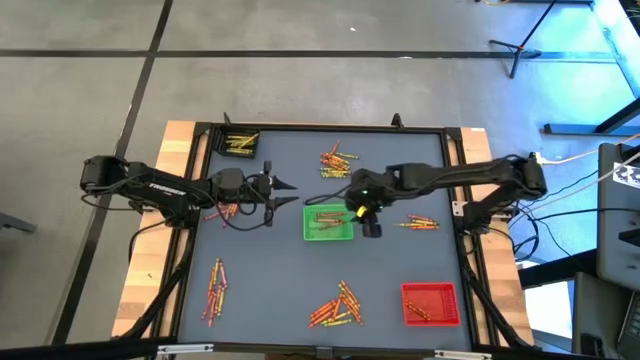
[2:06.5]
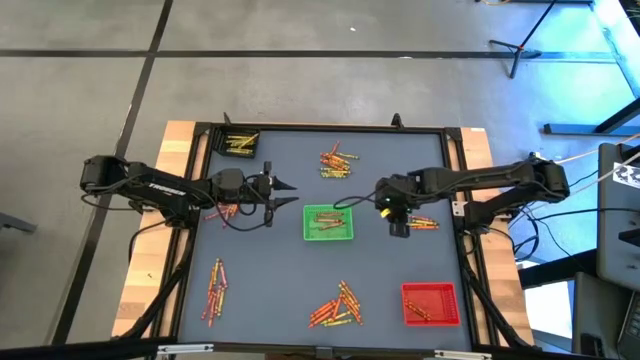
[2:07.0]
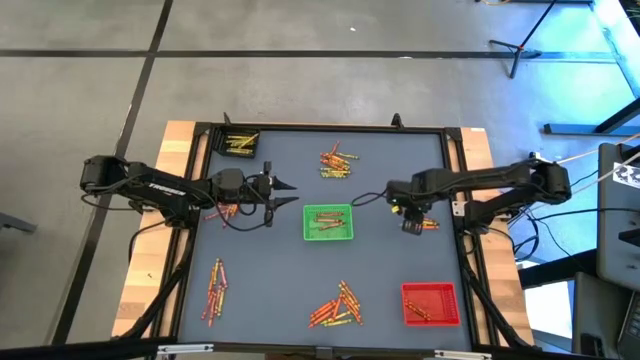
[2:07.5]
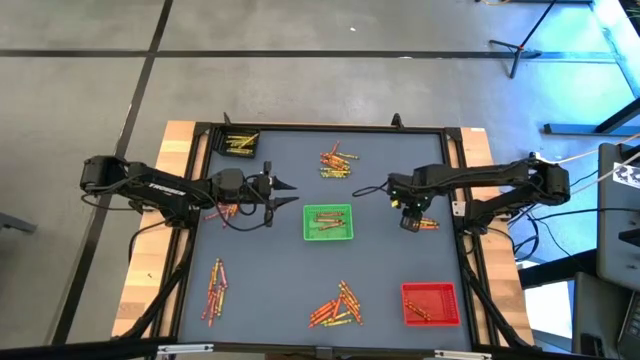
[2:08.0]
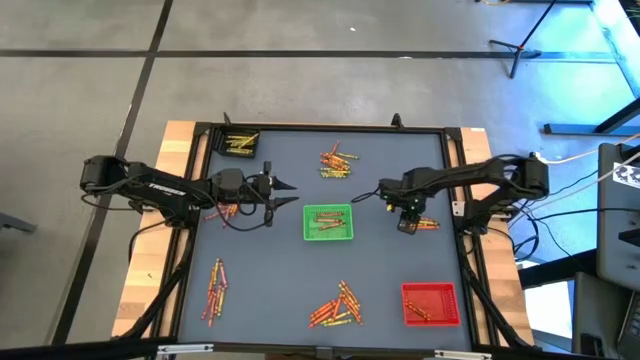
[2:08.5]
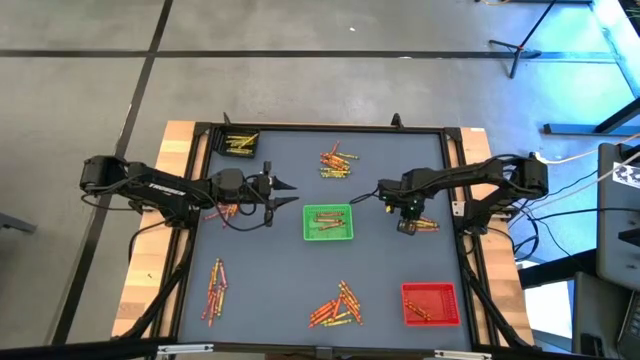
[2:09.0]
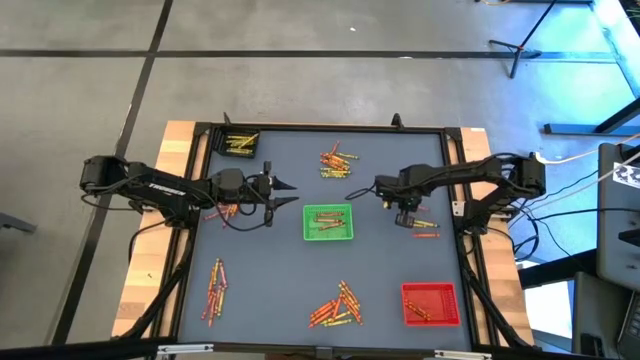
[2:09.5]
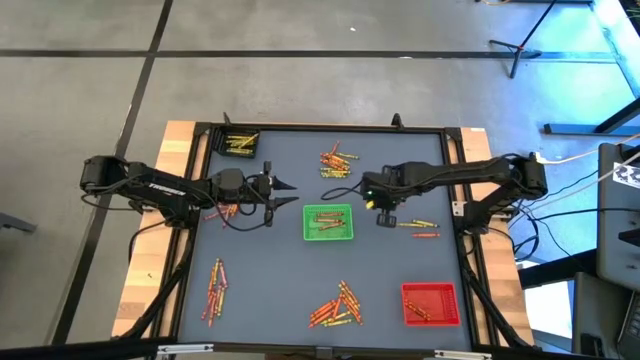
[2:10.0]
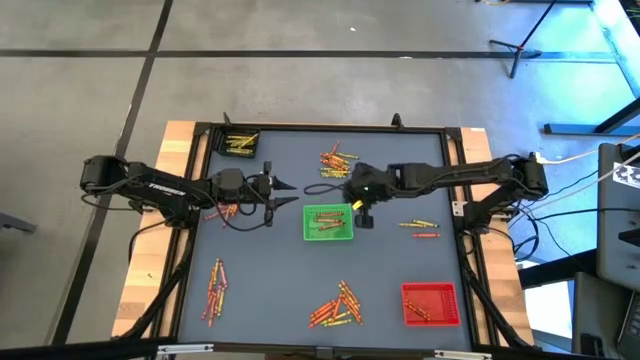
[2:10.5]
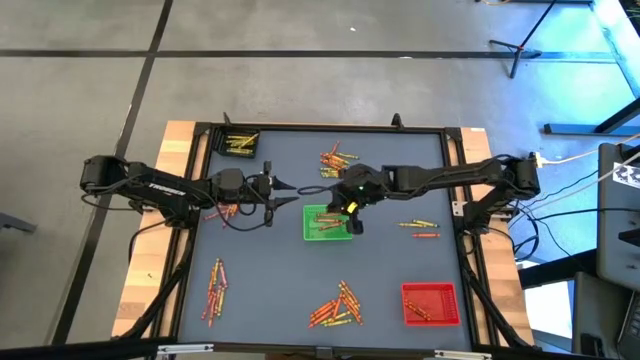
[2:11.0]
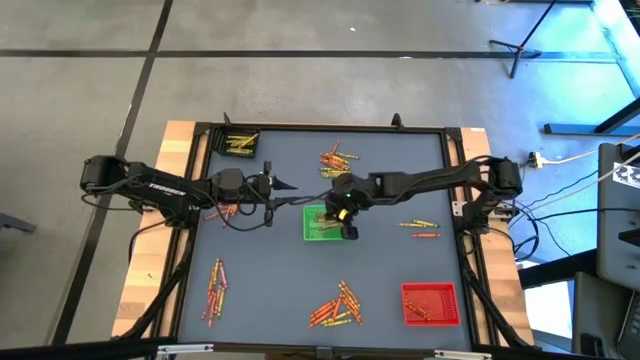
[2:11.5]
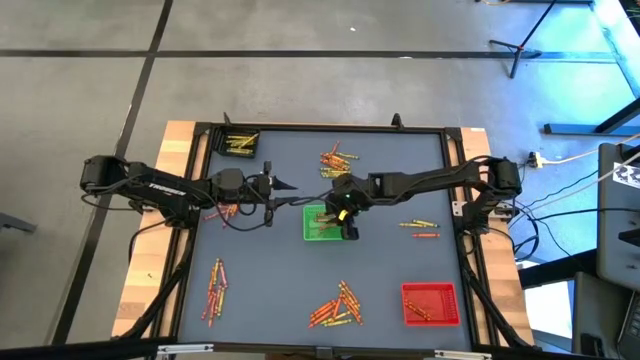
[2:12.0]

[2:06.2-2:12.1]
Task: Sort crayons
Put the red crayon into the green bin

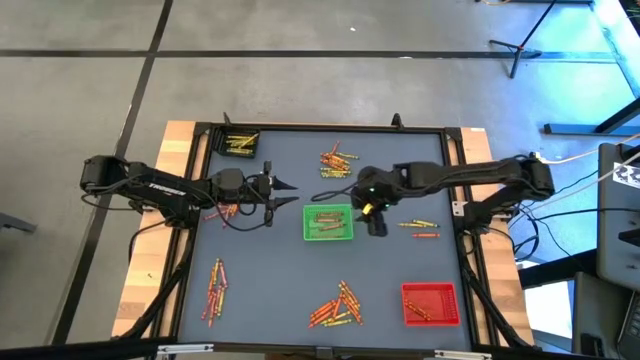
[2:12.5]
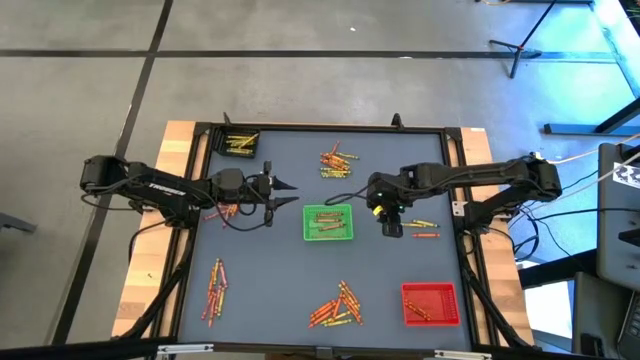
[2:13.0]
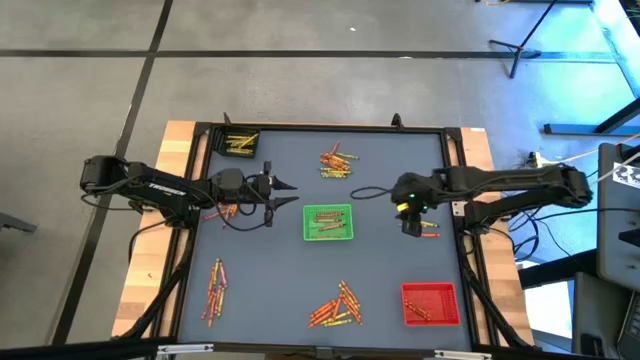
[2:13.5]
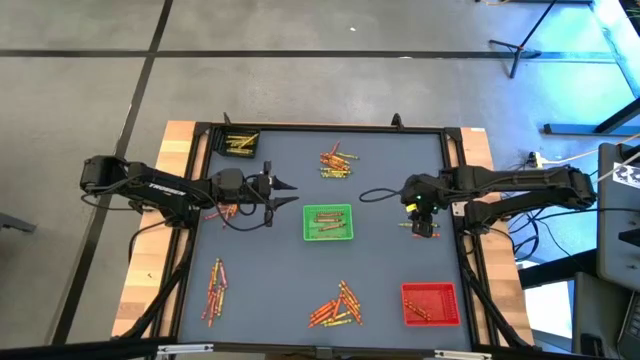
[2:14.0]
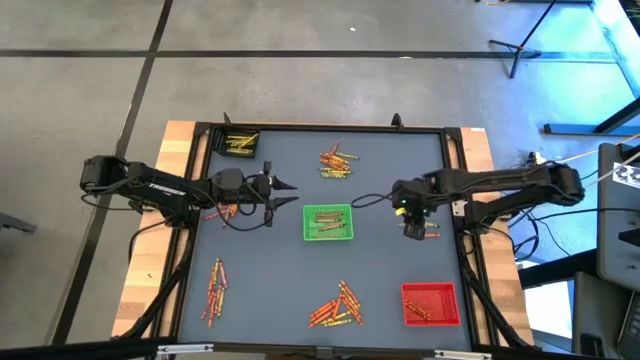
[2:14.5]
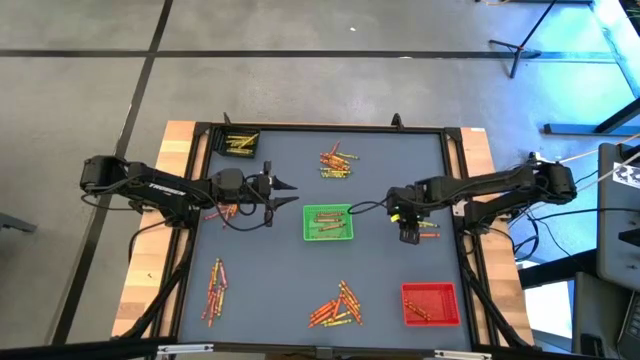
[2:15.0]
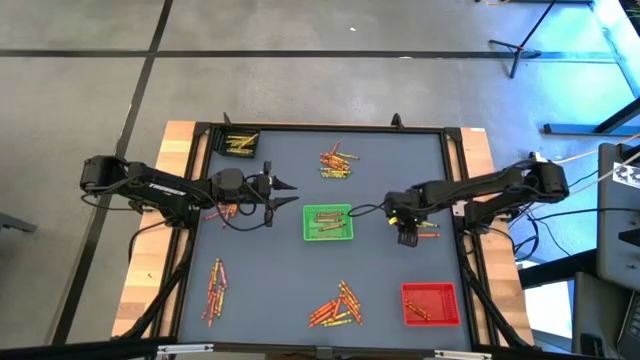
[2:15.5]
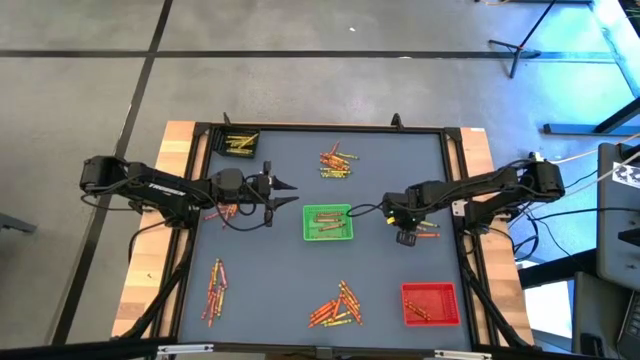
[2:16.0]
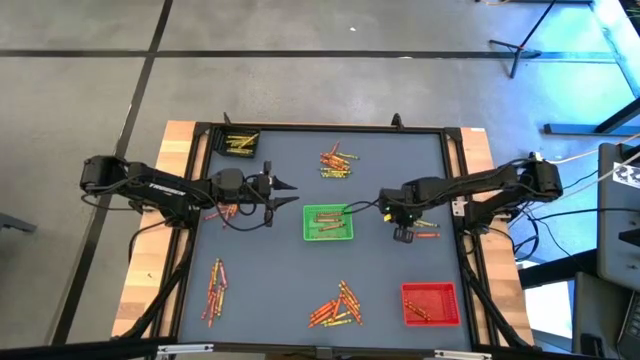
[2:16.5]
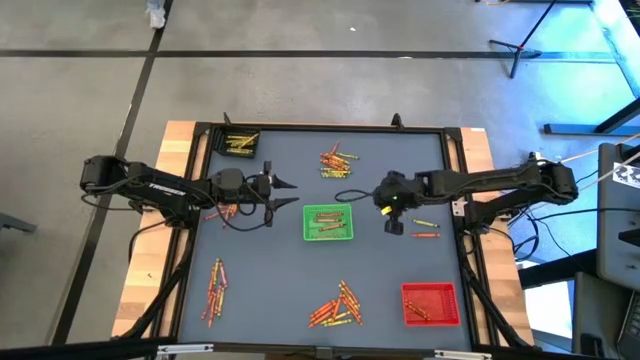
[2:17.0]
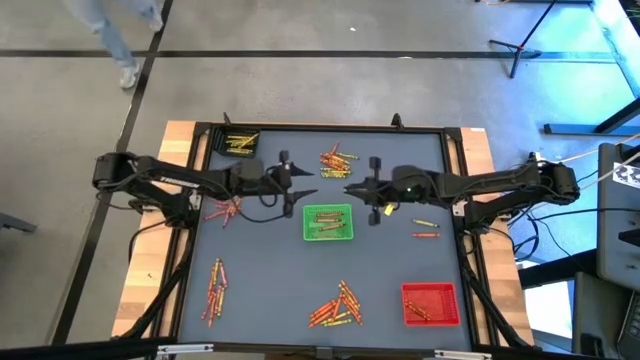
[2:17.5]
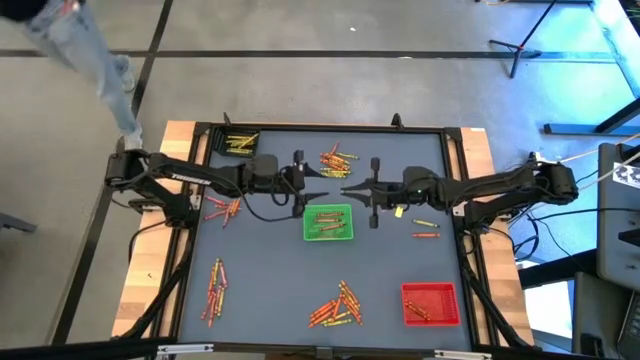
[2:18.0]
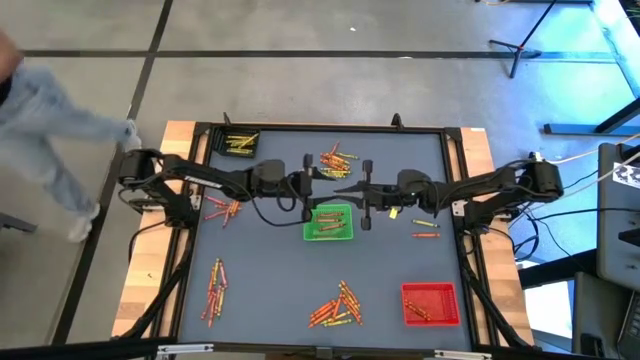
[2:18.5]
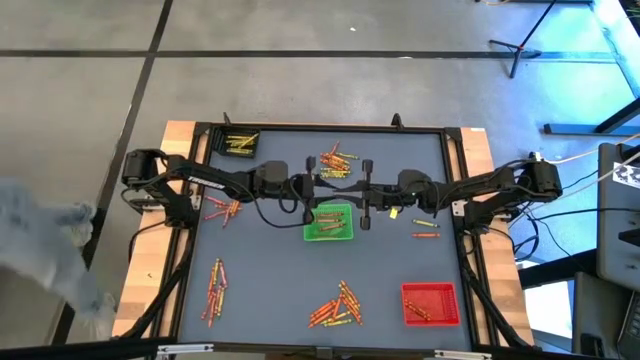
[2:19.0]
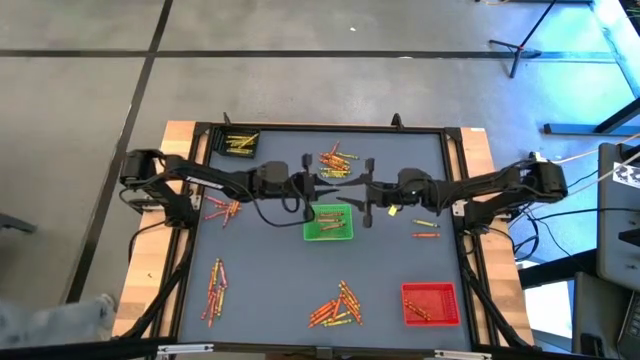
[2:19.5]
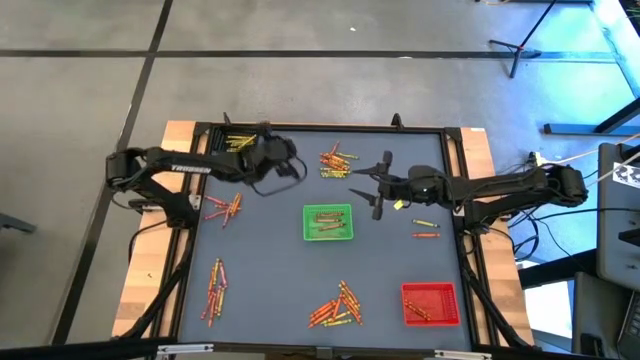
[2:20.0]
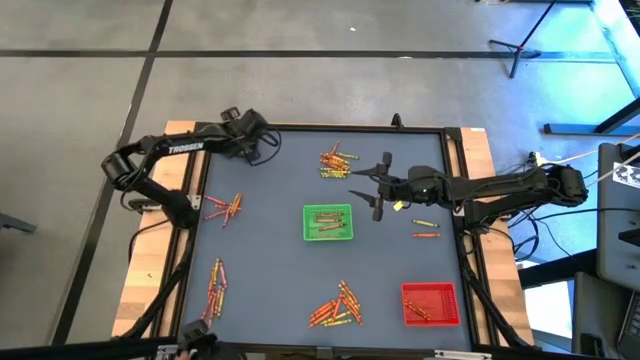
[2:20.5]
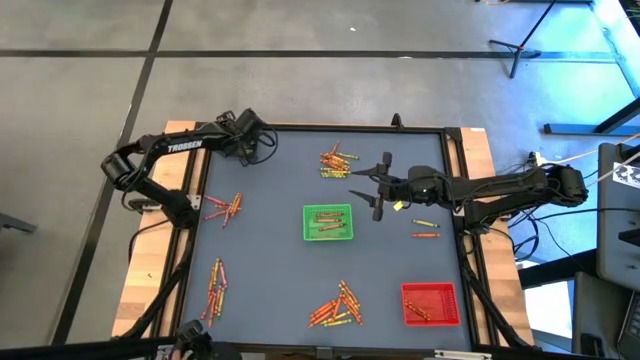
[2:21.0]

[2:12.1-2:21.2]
Put the light green crayon into the black bin

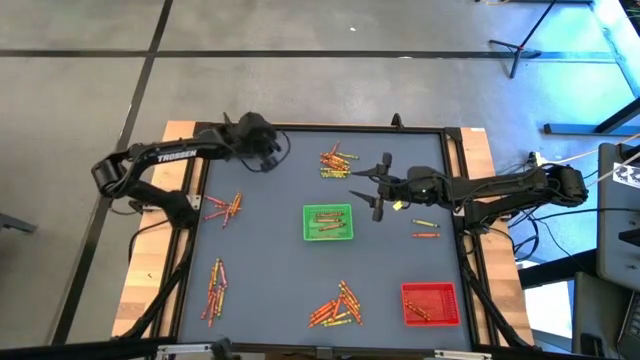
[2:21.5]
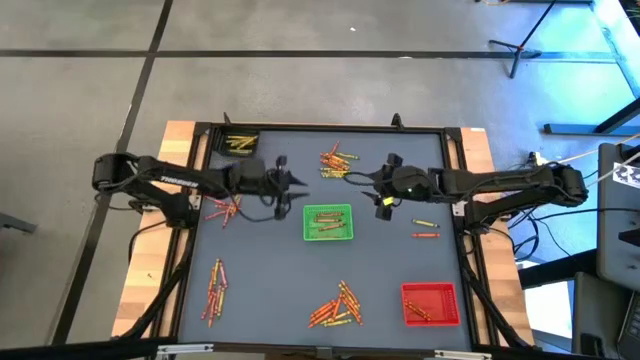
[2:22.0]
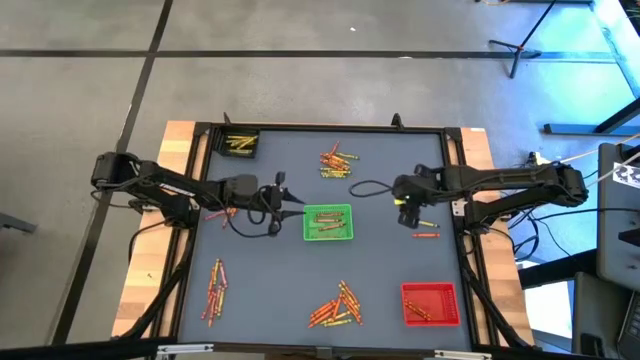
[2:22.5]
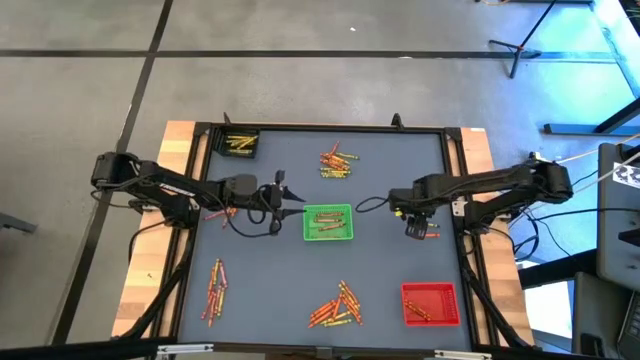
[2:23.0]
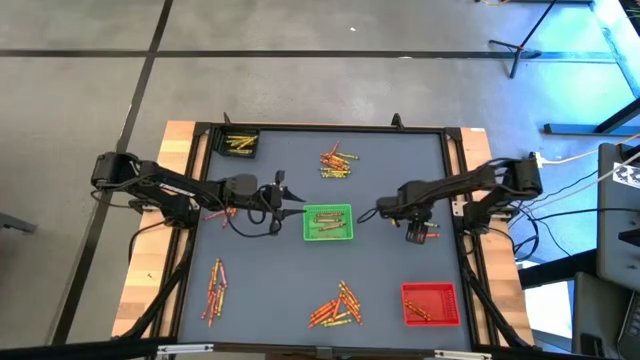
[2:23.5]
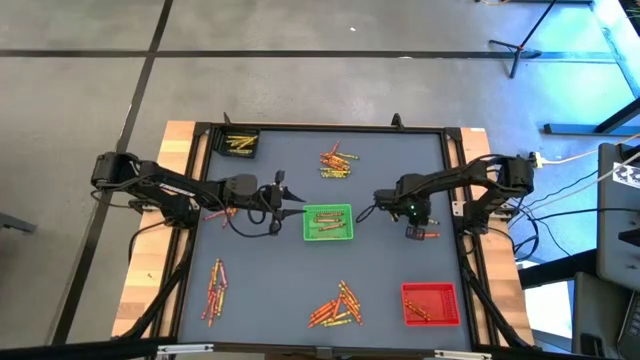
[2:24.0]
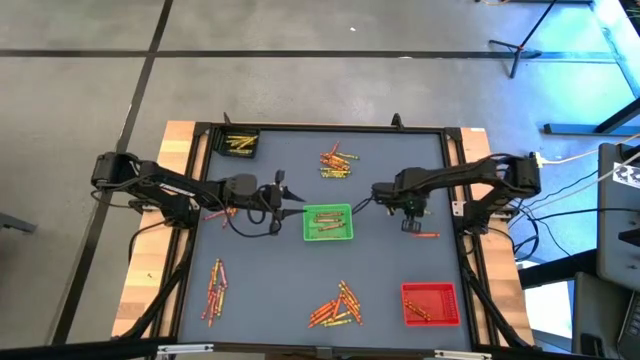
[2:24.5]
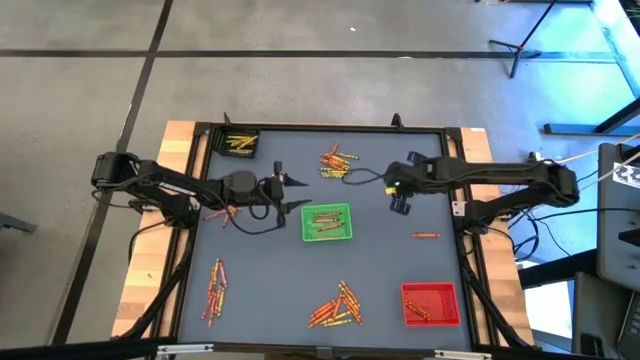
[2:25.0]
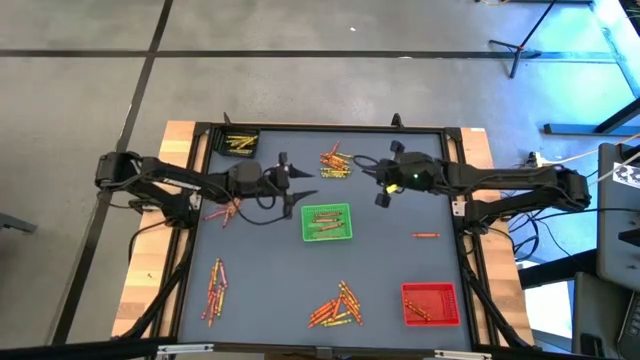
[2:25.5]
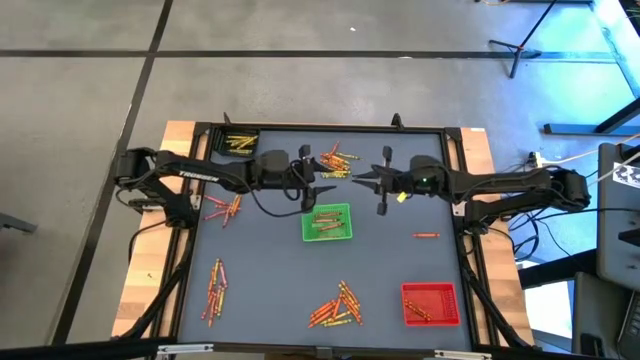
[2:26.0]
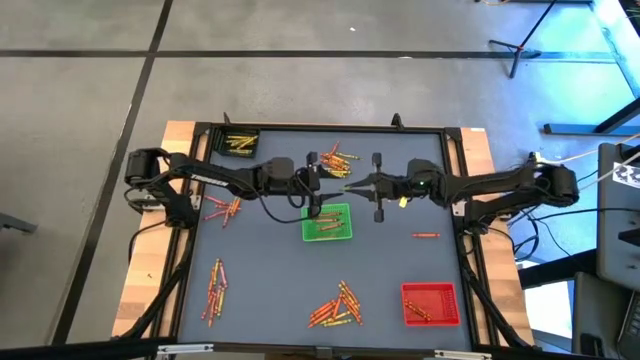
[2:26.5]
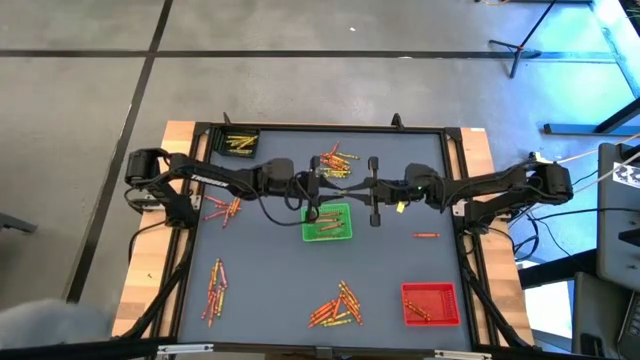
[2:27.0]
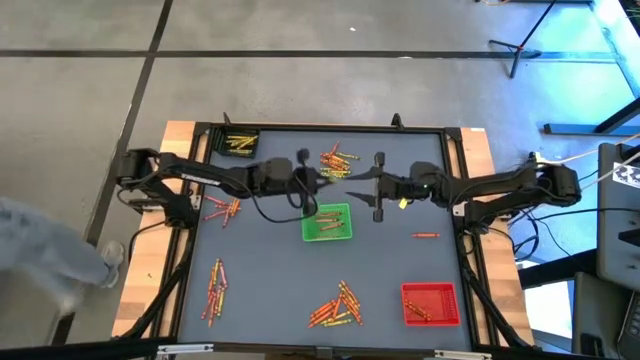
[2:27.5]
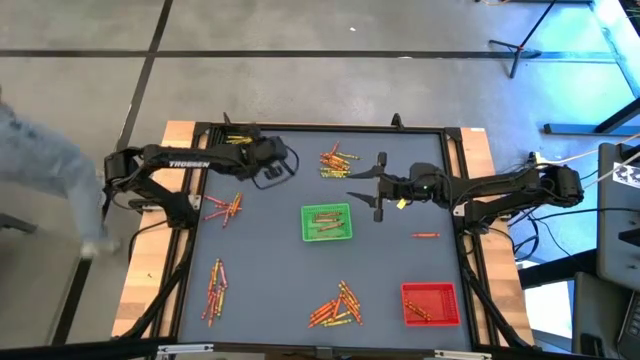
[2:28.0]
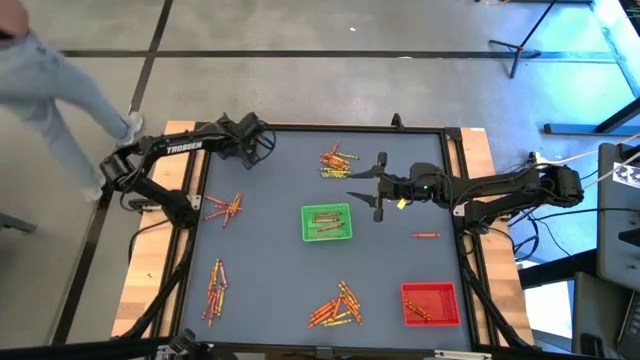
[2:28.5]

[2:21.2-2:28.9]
Put the green crayon into the black bin
